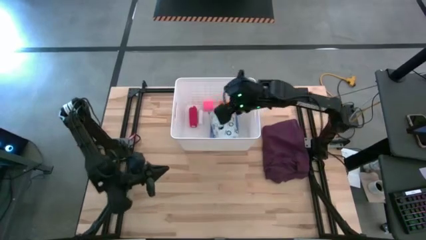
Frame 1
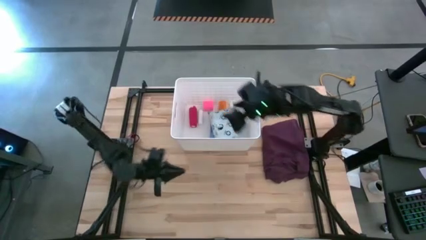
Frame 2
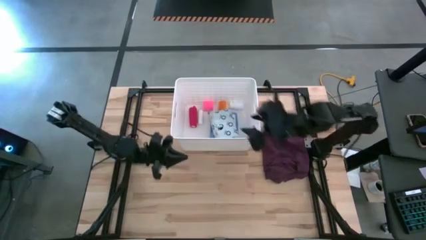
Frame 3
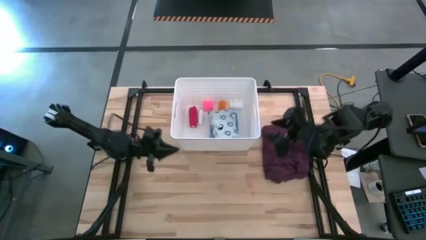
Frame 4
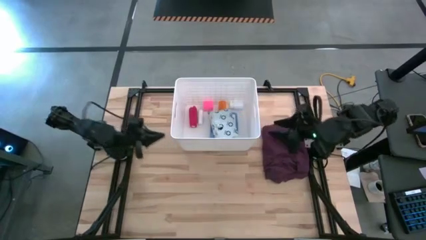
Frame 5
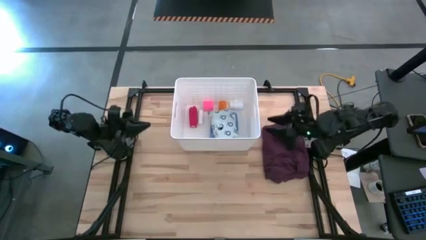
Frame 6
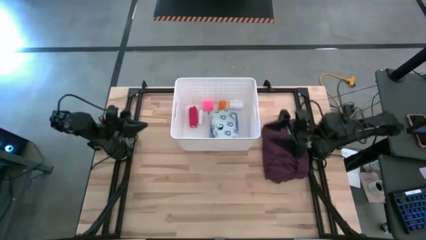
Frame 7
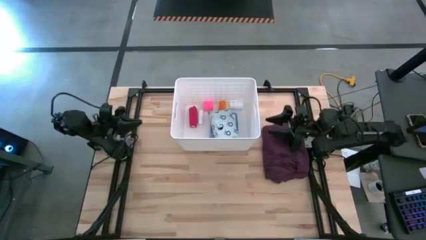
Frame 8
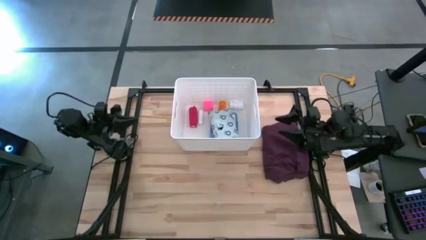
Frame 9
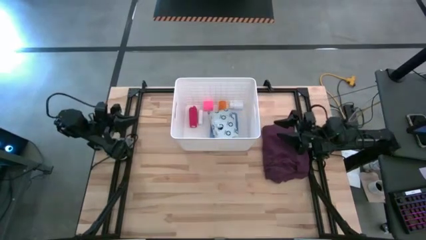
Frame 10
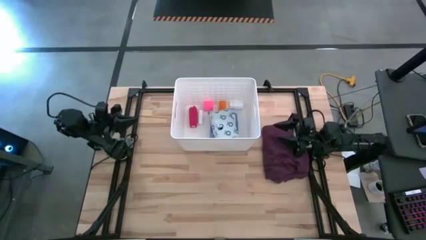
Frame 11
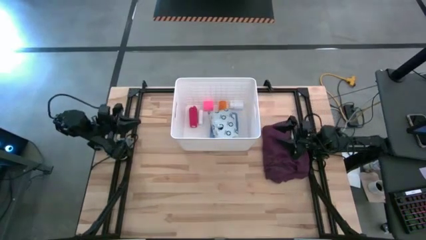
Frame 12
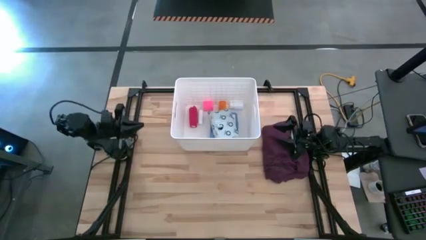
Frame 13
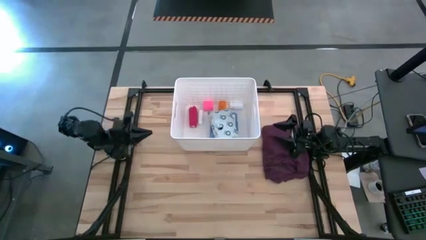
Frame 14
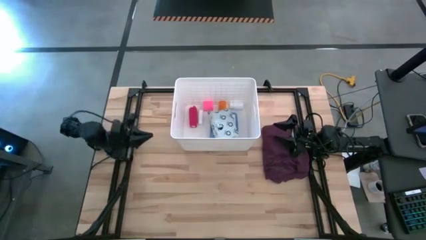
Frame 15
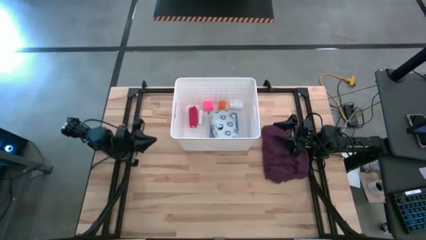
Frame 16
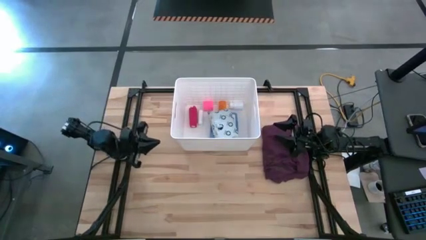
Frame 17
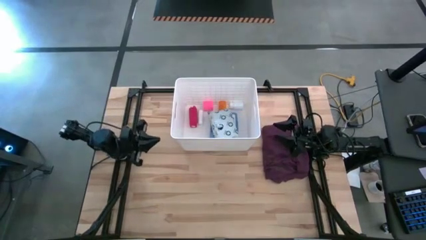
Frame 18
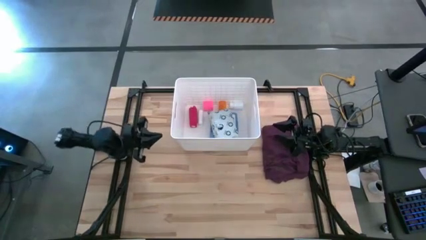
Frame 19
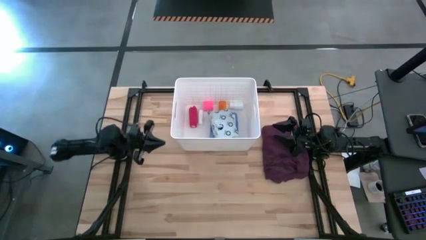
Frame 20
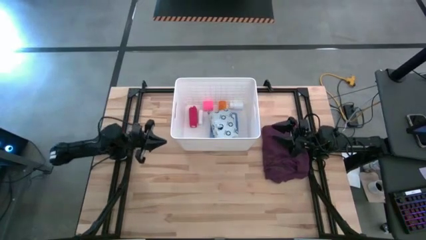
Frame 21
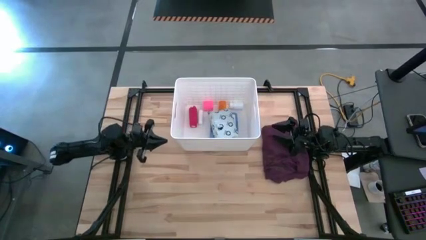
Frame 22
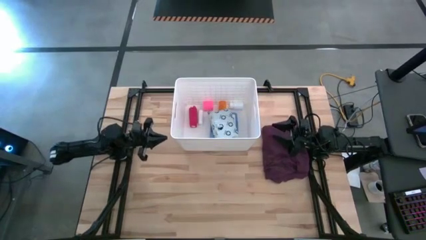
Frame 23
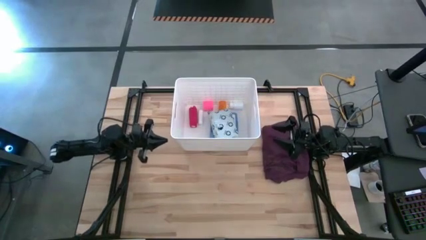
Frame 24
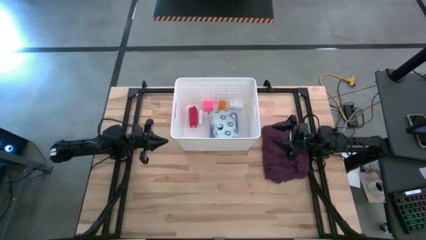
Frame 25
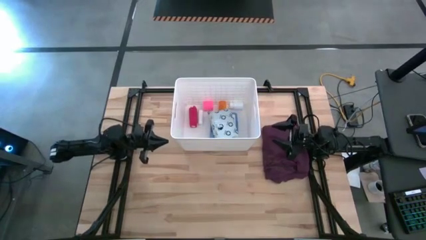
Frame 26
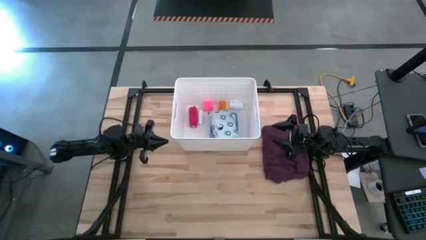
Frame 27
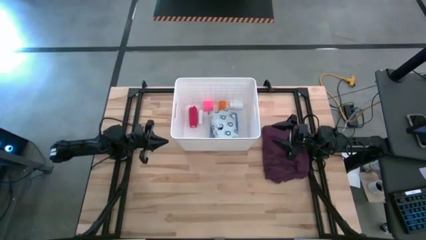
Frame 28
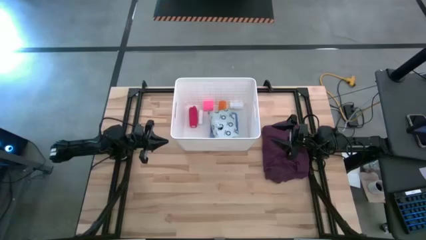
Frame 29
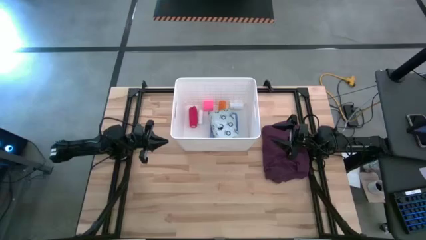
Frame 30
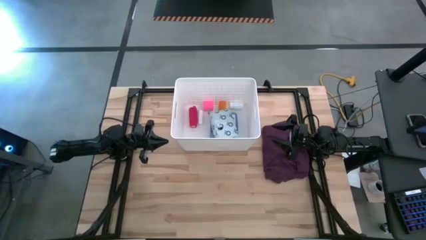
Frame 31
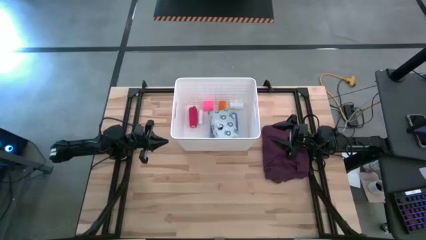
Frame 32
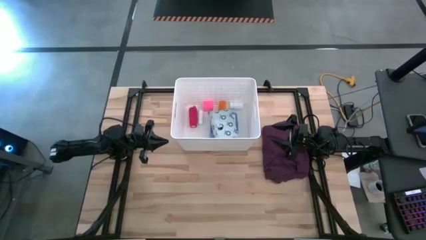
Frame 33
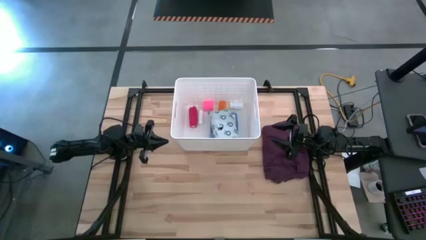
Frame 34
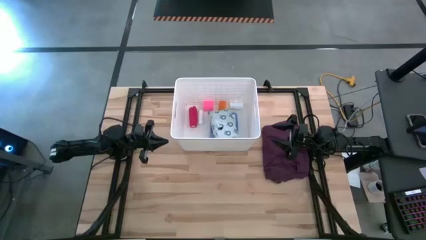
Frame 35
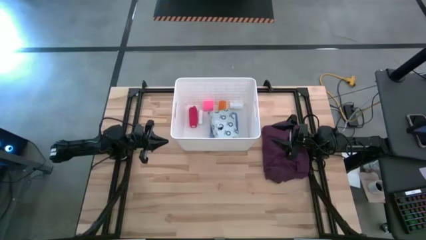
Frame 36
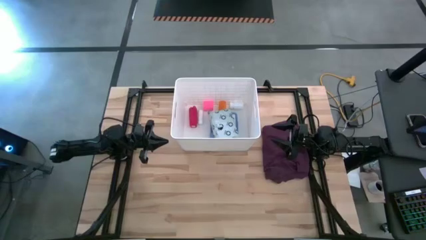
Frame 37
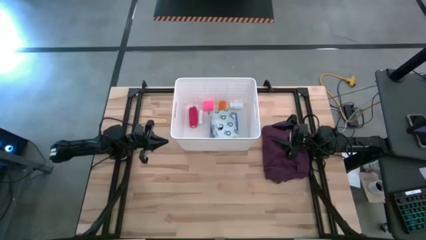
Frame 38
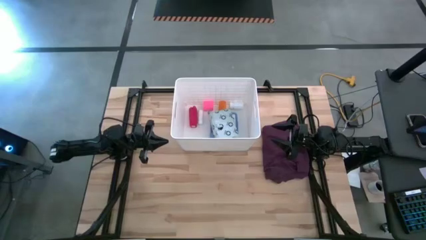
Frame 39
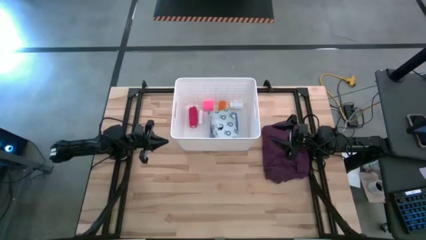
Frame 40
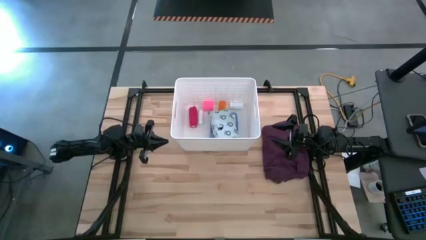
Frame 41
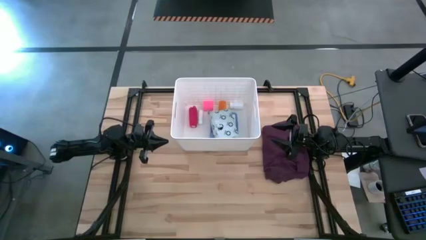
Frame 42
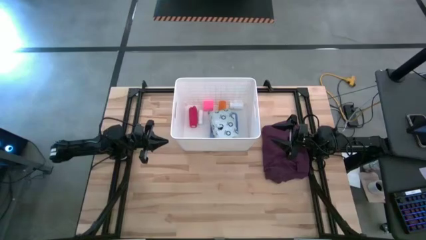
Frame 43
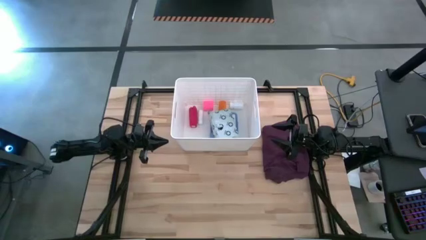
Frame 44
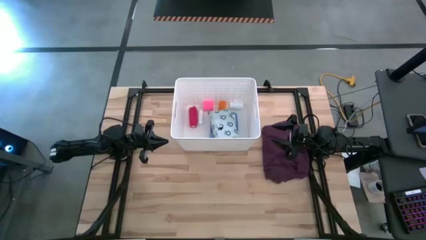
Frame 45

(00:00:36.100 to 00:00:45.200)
Task: Pick & place medical supplies in basket/bin
Return to home position

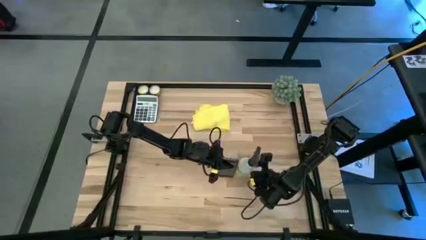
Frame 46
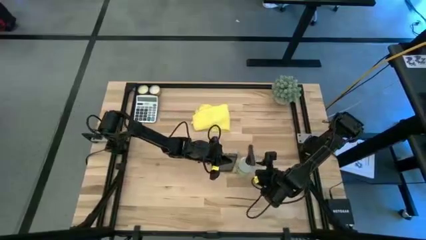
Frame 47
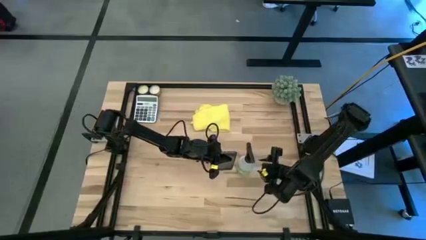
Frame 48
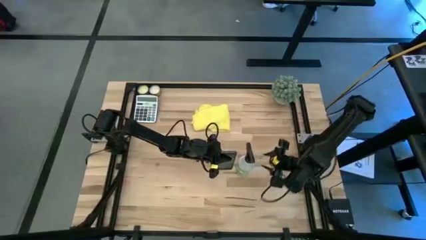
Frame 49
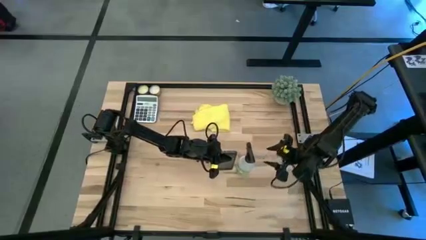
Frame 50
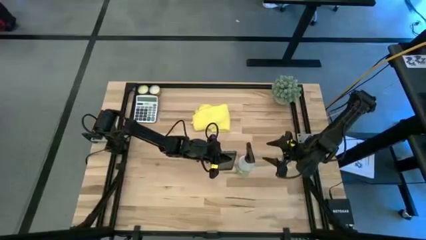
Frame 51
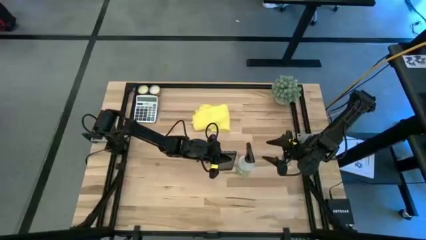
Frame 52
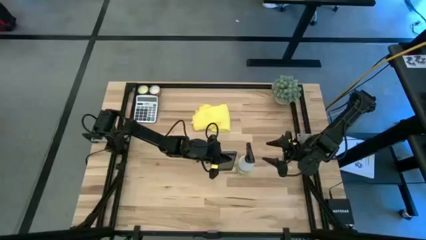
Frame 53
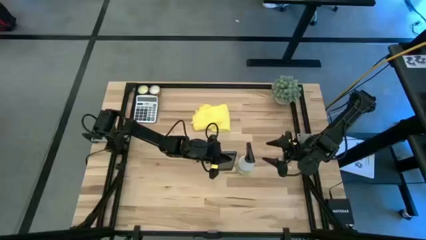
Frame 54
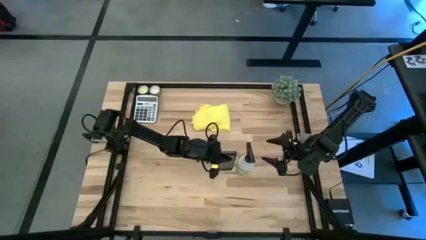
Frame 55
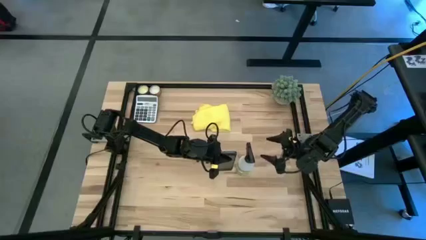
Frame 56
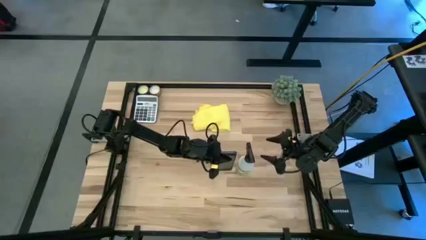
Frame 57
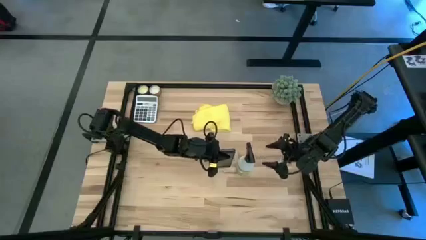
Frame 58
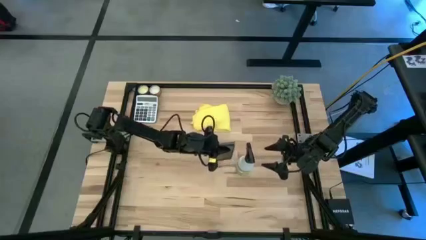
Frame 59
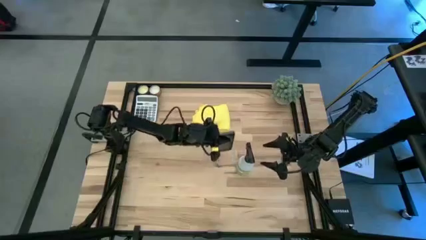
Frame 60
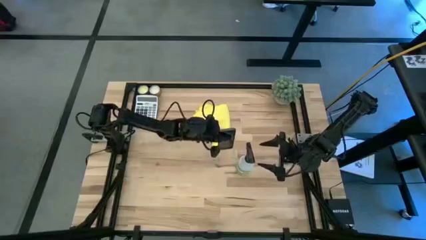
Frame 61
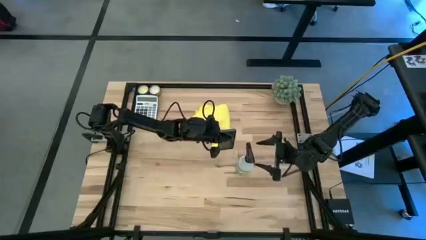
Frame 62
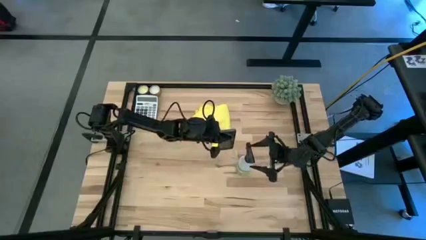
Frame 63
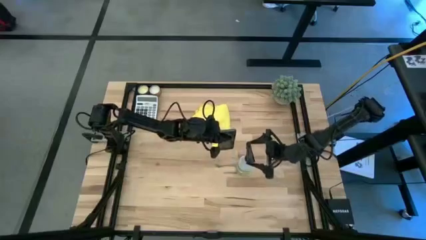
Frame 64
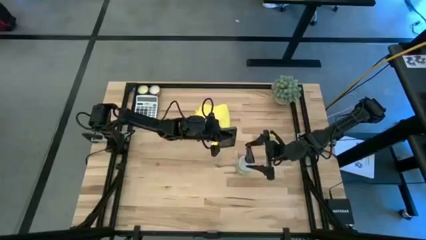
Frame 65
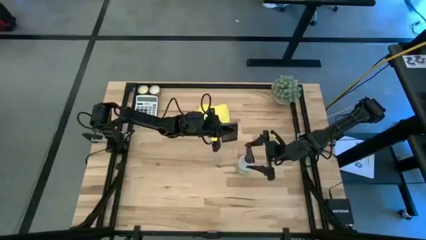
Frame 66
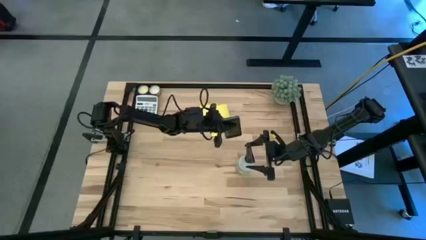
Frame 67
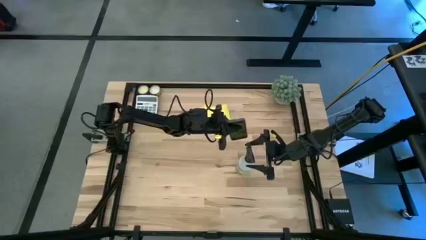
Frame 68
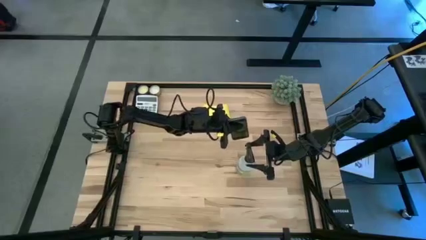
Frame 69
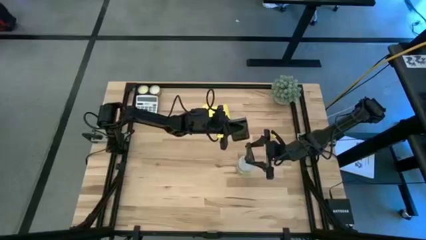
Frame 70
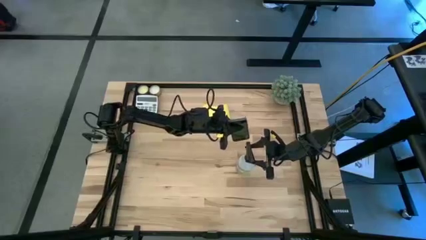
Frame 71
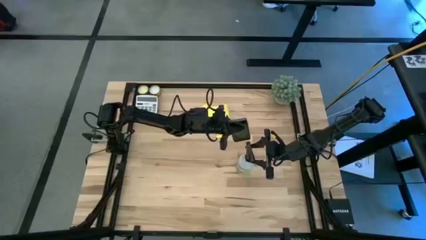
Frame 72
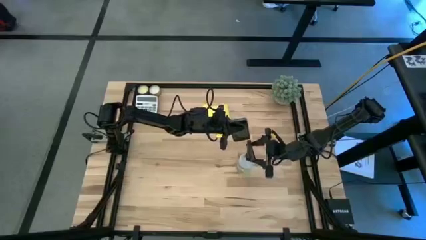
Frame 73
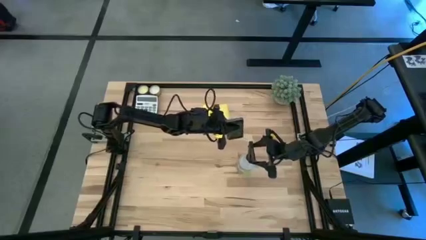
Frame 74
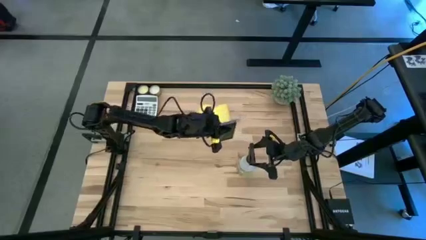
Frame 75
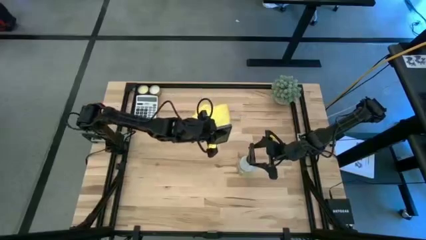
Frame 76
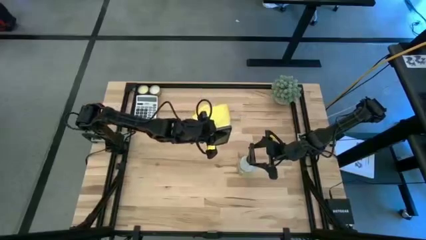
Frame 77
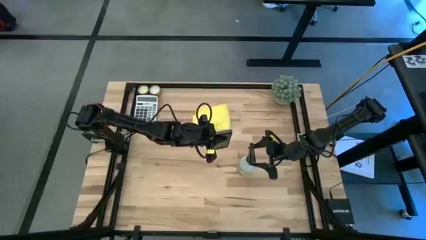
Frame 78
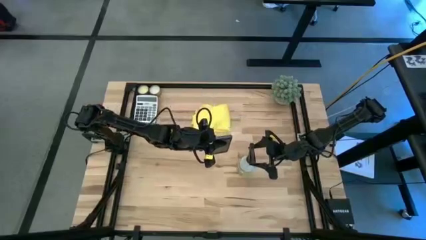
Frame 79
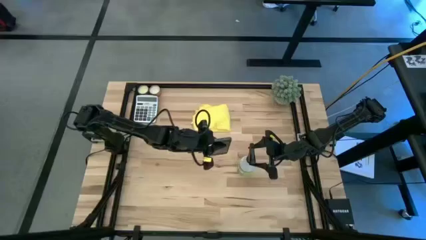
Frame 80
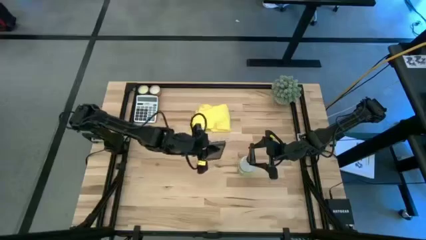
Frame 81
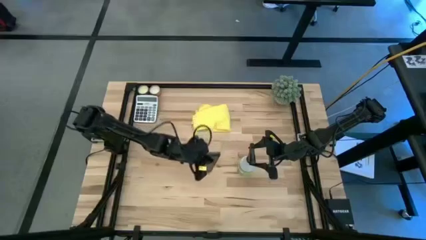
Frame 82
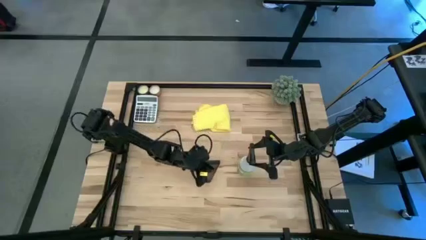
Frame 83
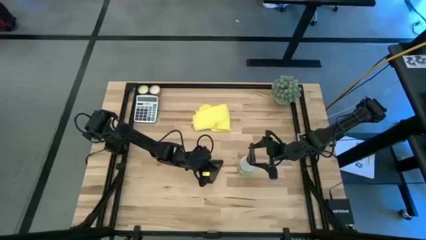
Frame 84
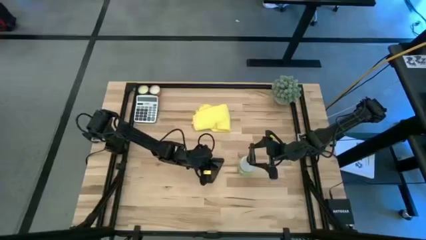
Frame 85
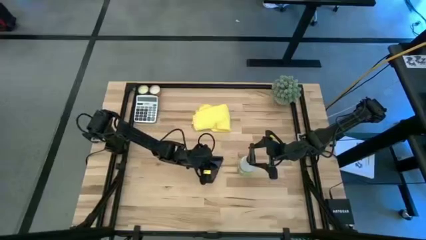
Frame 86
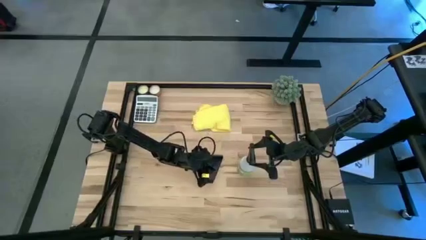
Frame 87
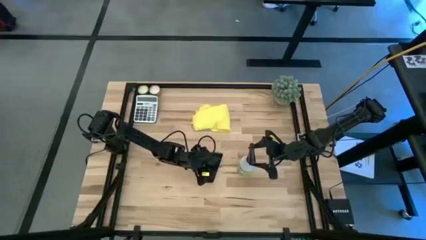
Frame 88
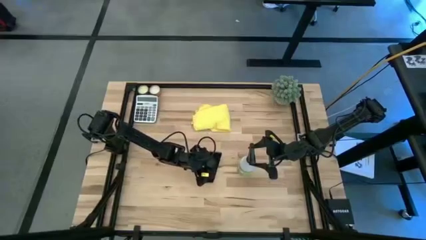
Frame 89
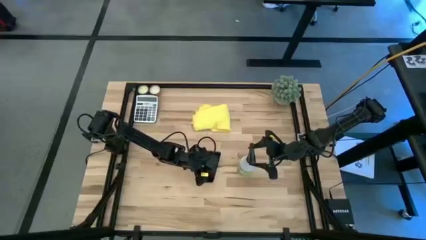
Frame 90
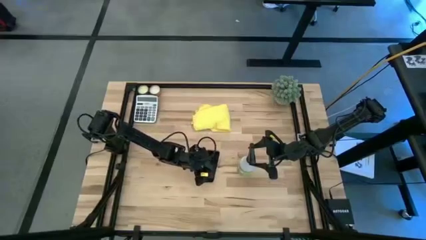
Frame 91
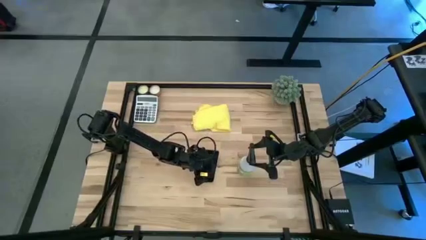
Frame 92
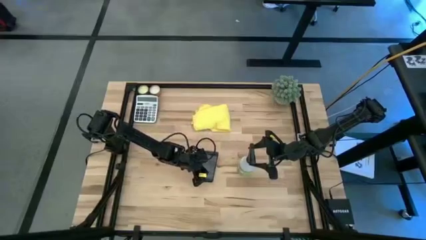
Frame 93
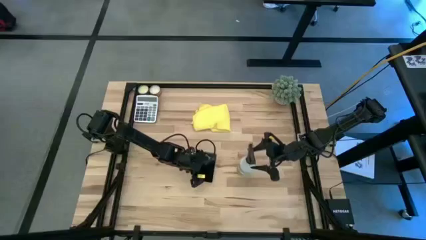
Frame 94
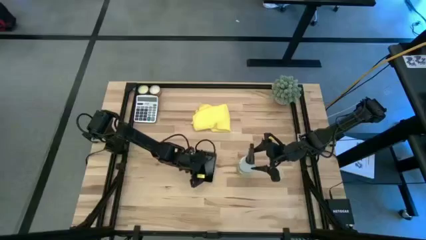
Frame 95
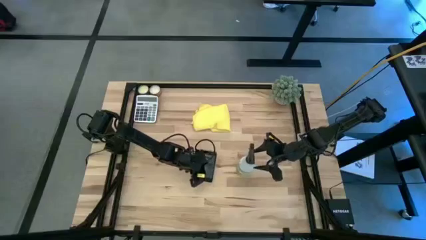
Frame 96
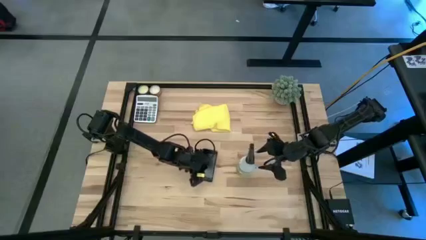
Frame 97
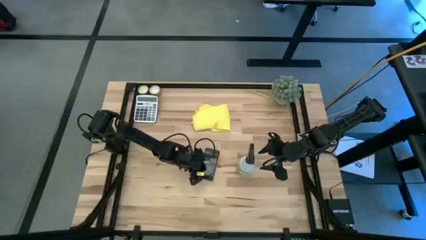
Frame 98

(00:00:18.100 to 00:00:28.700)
Task: Apply microfiber cloth
Spray the front of the black cellphone using the white spray bottle
